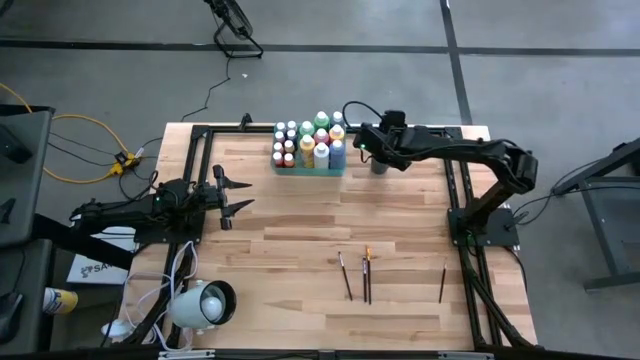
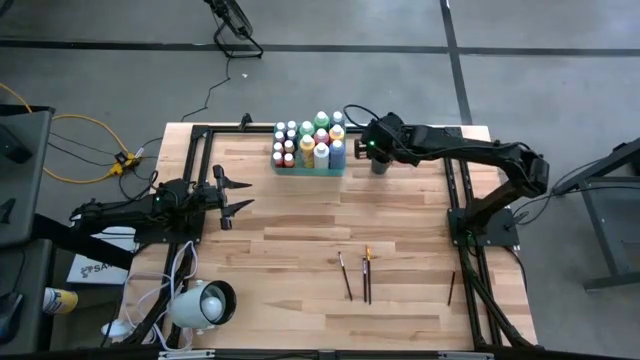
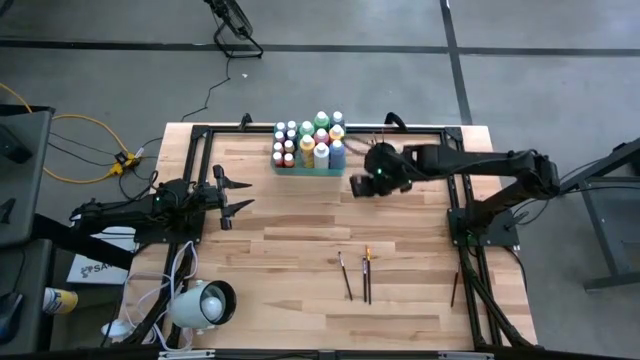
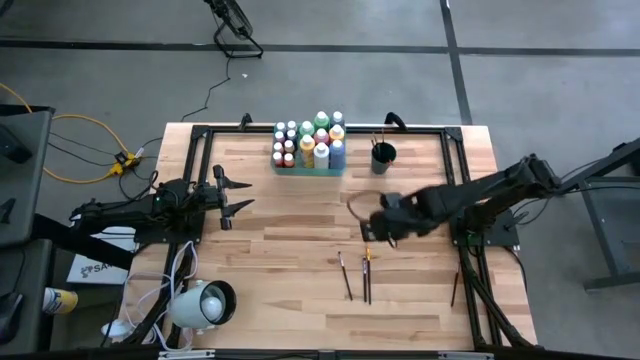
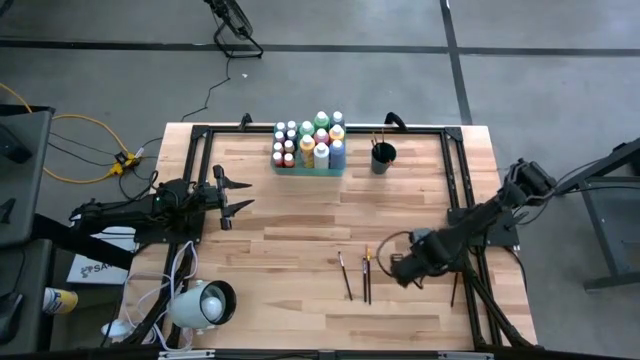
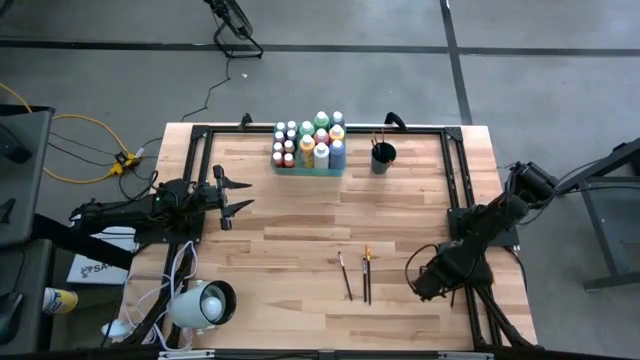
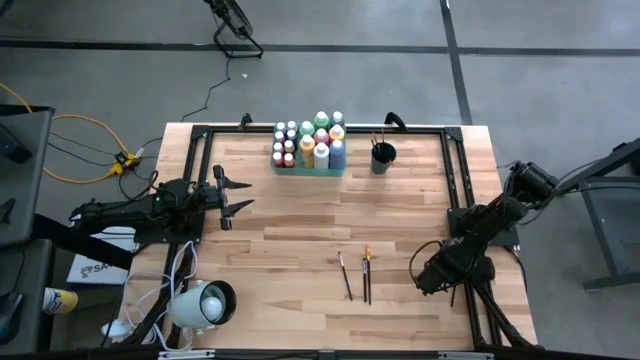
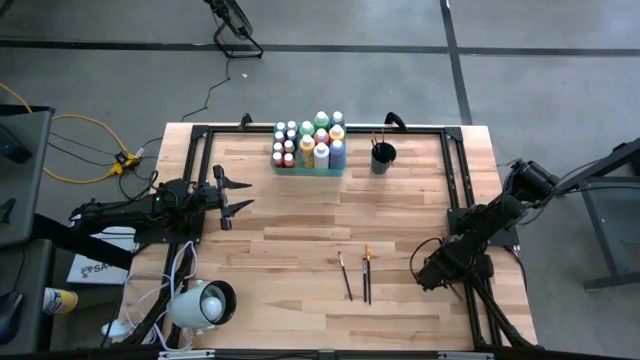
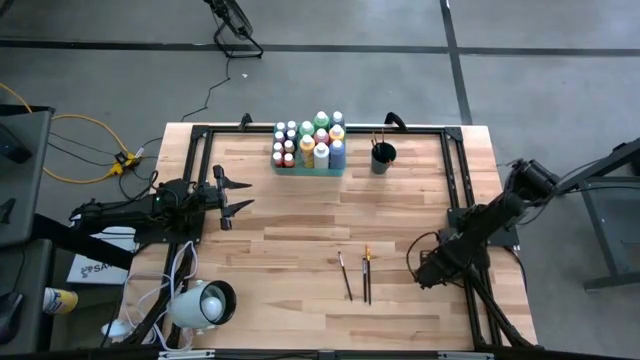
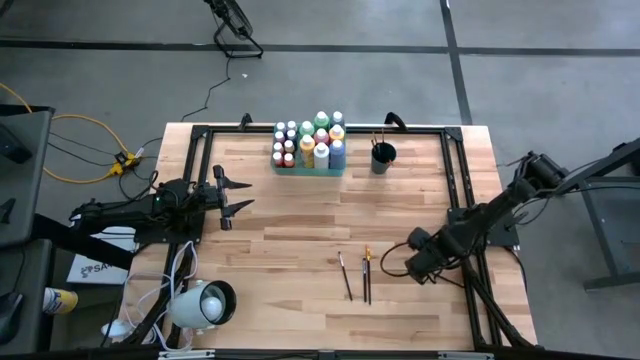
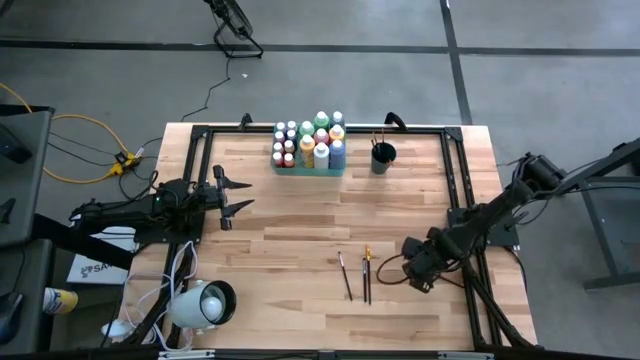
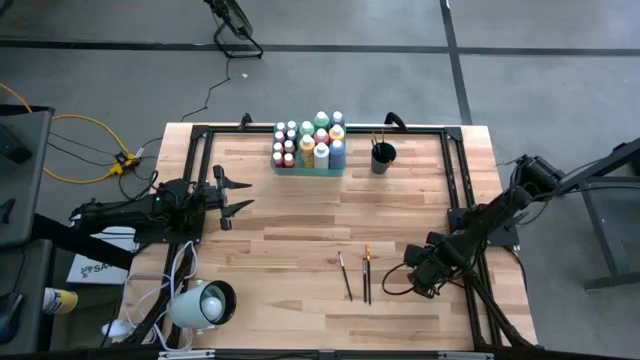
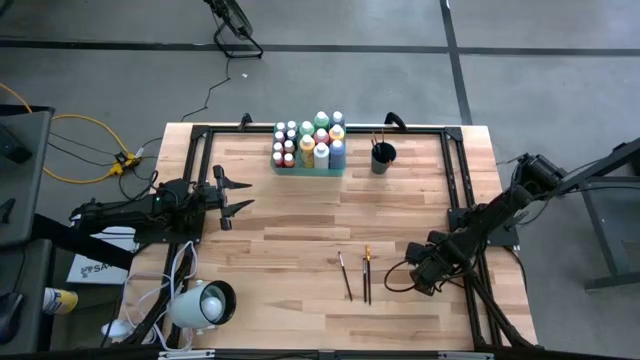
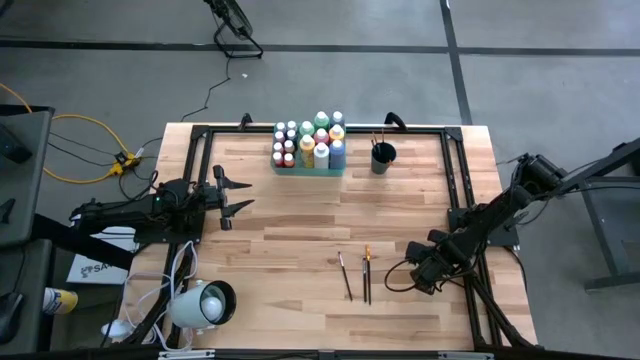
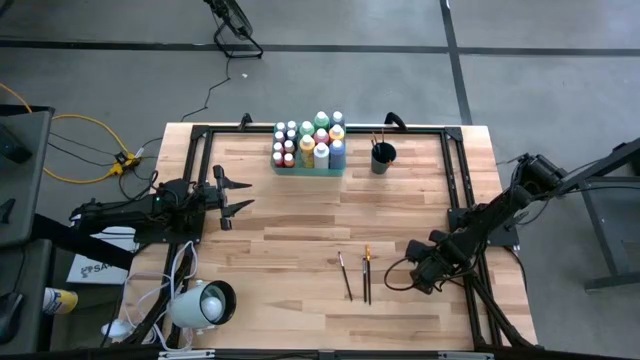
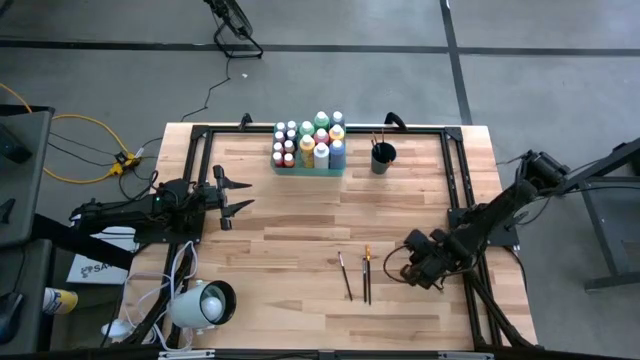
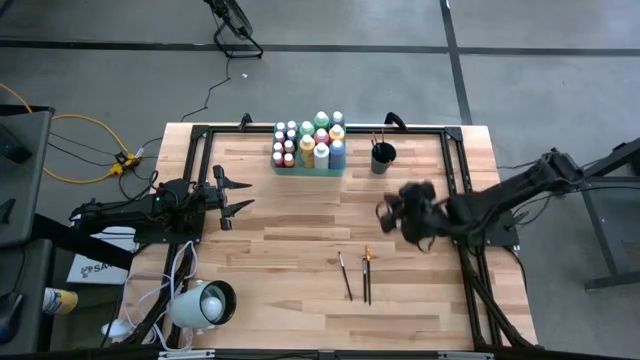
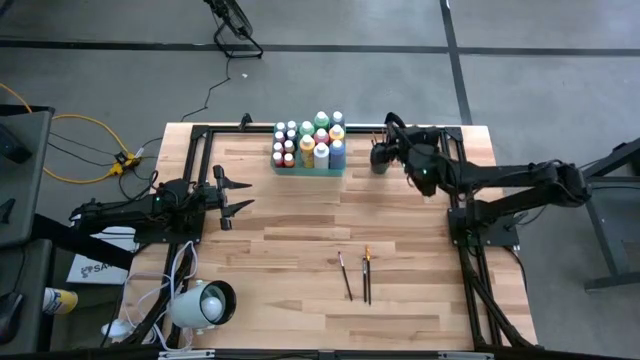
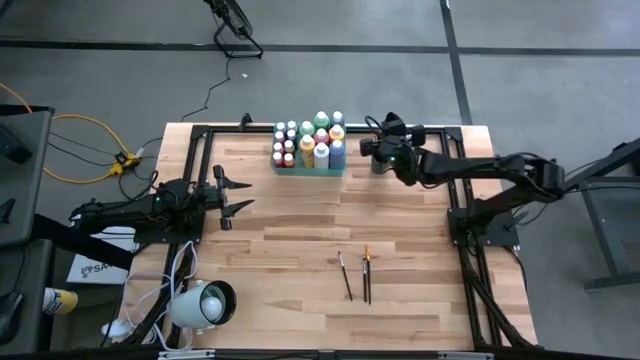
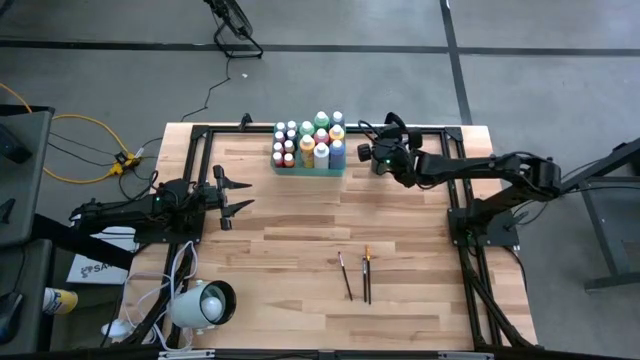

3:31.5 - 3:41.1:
Task: Pick & Place Paint Supplies
Put the silver paint brush into the green cup

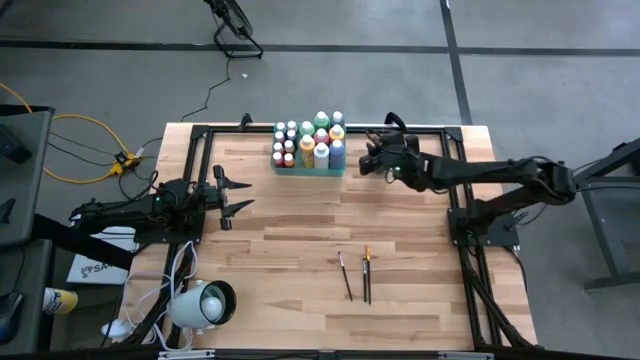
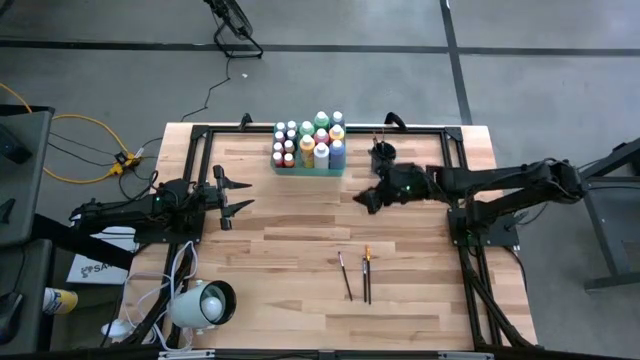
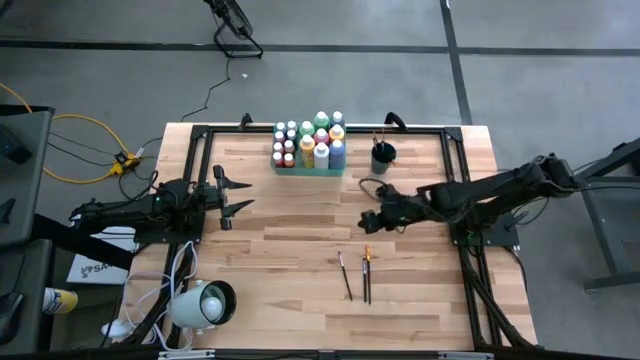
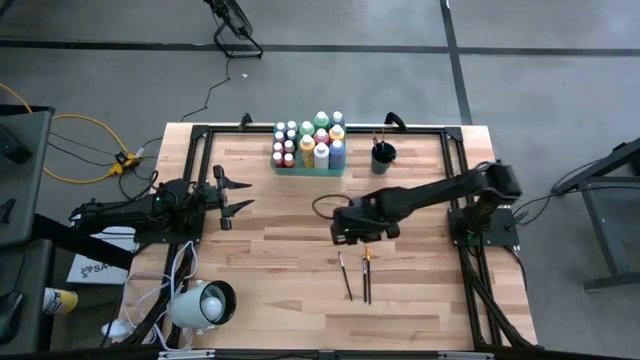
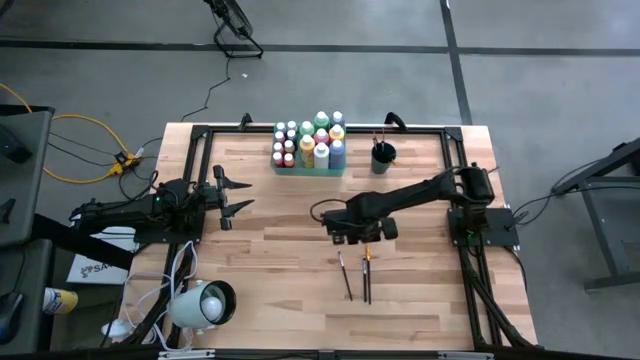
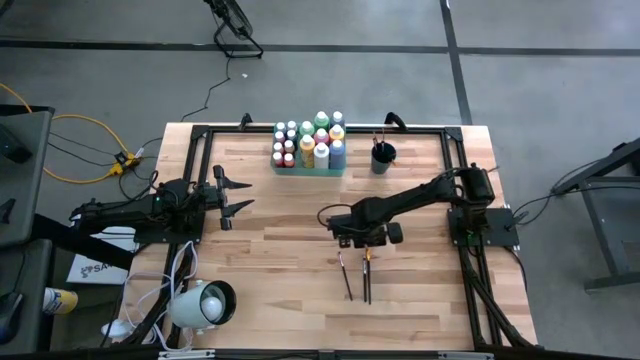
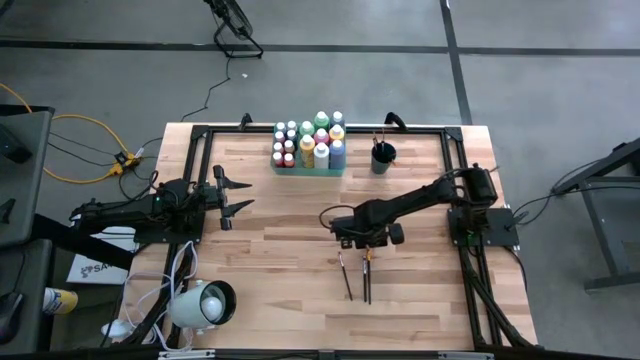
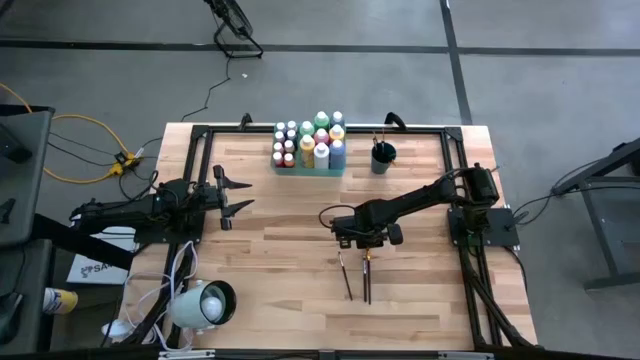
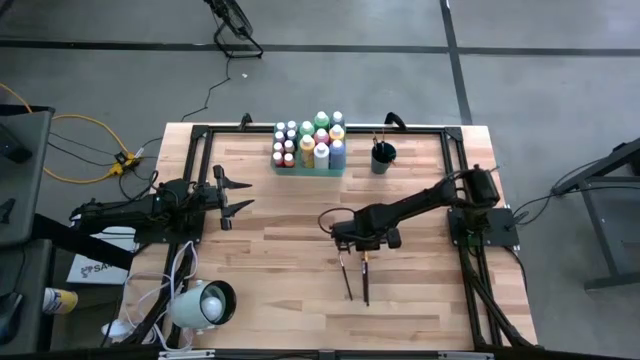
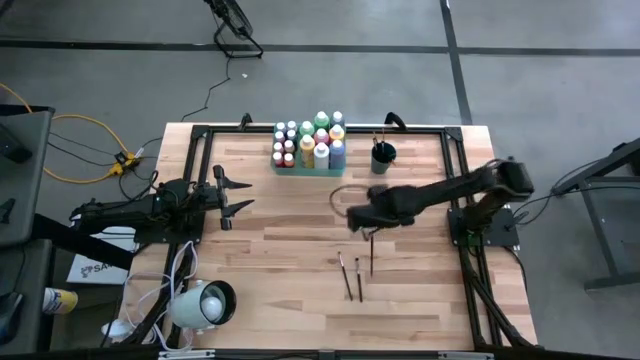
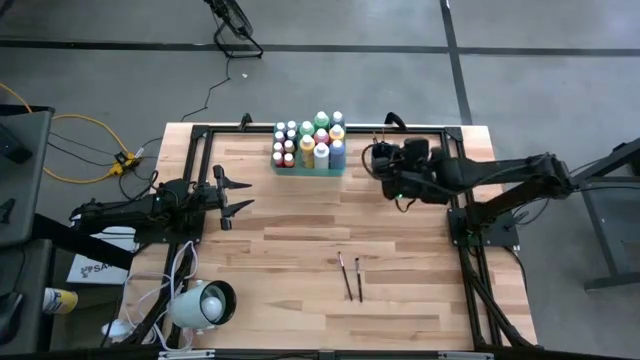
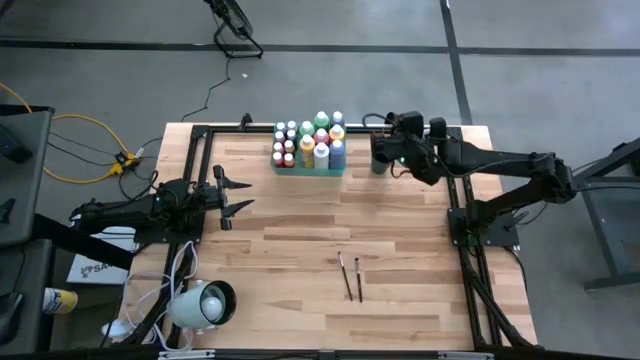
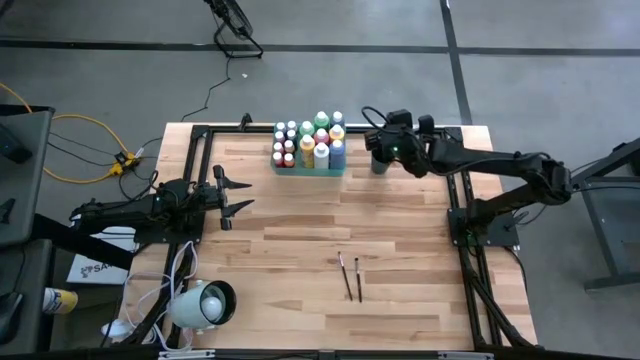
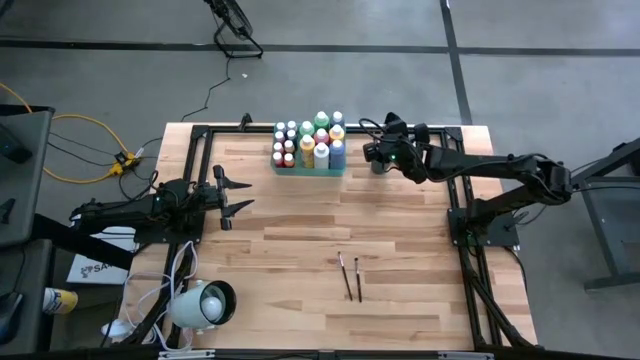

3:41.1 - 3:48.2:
Put the gold paint brush into the green cup

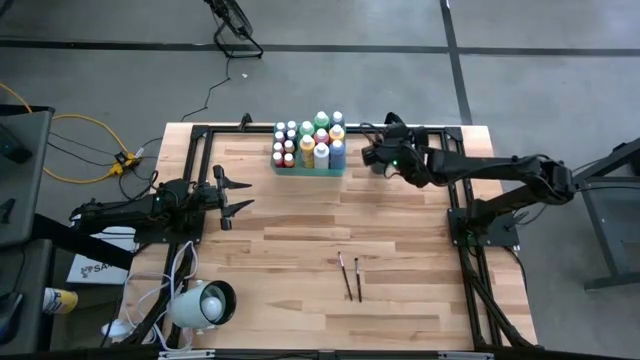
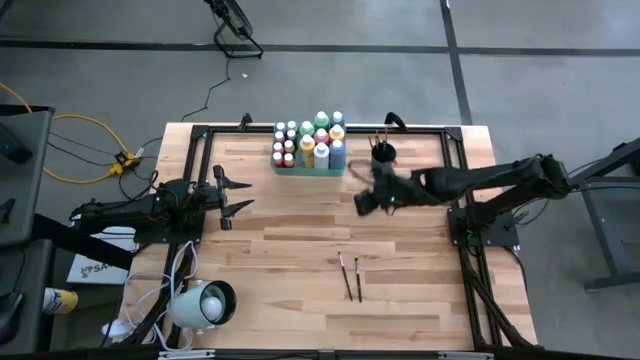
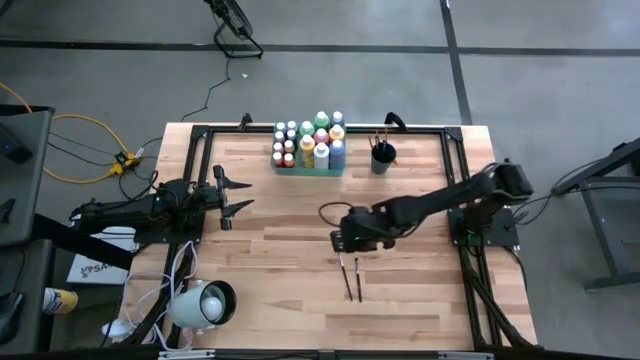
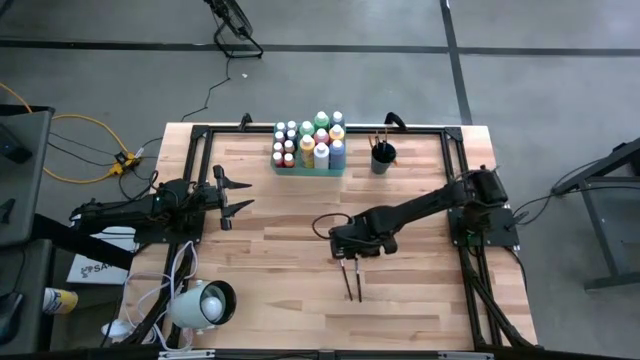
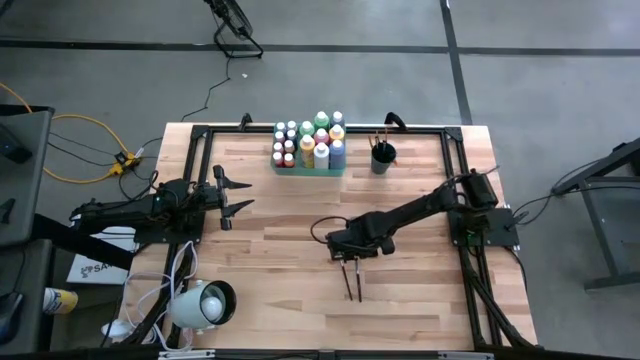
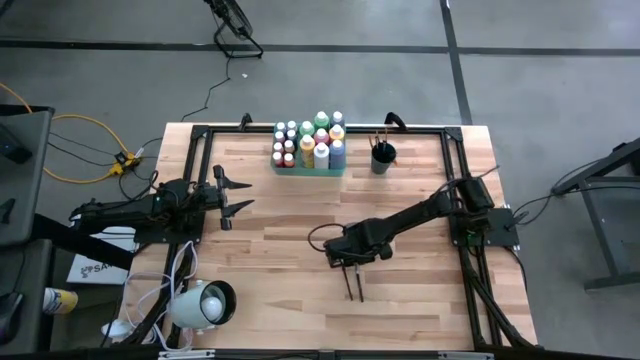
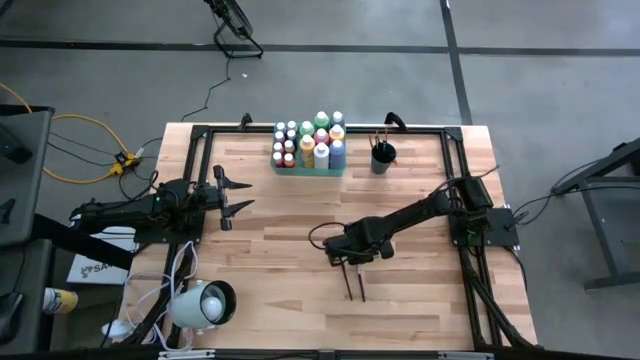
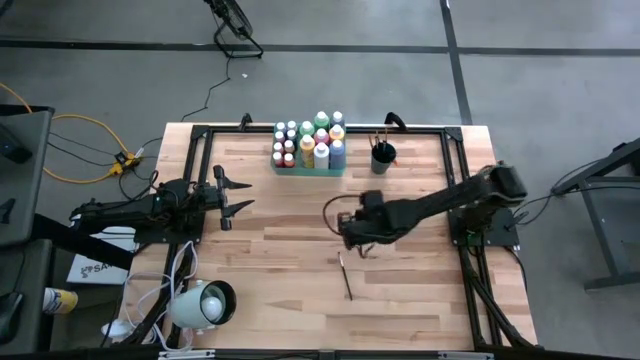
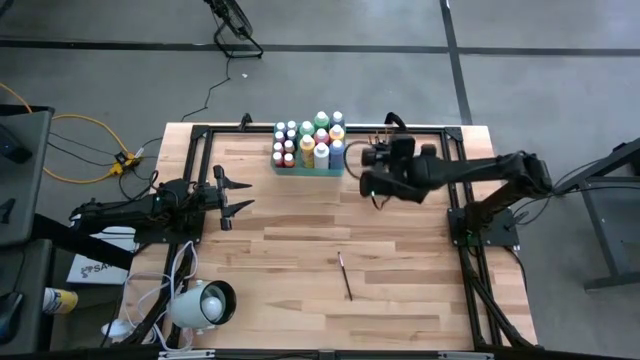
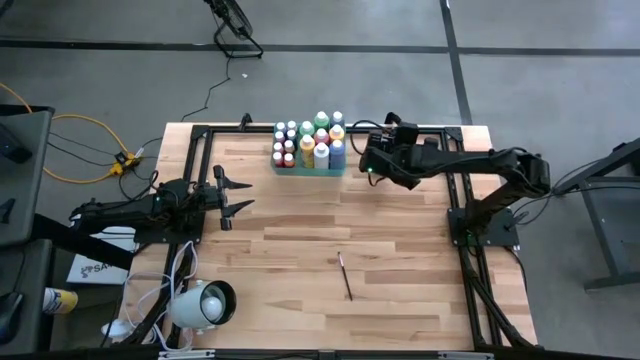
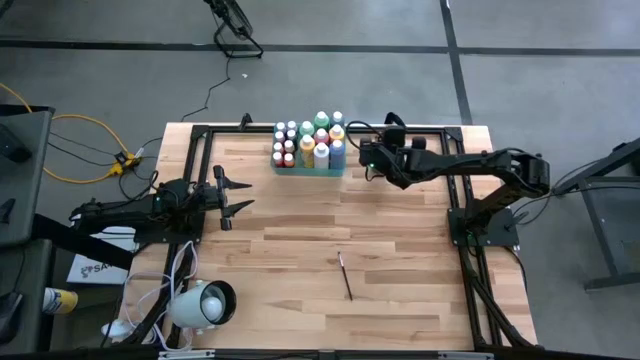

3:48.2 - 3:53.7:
Put the silver paint brush into the green cup
